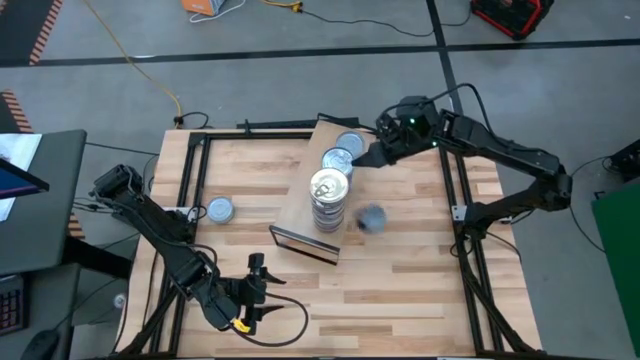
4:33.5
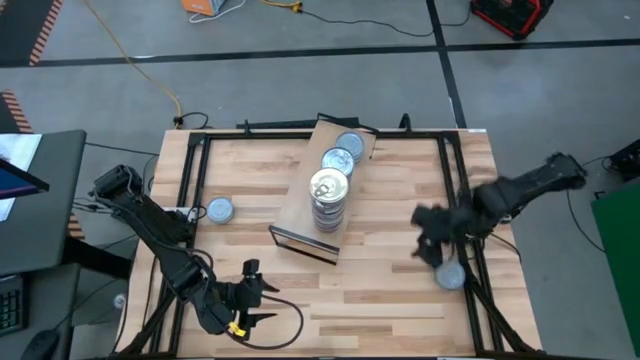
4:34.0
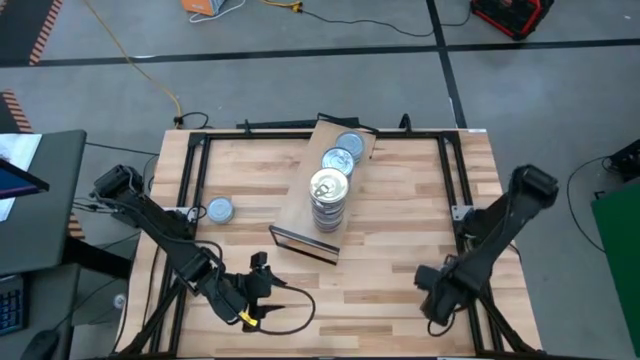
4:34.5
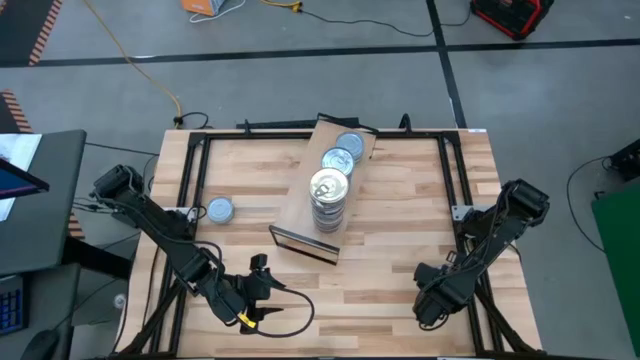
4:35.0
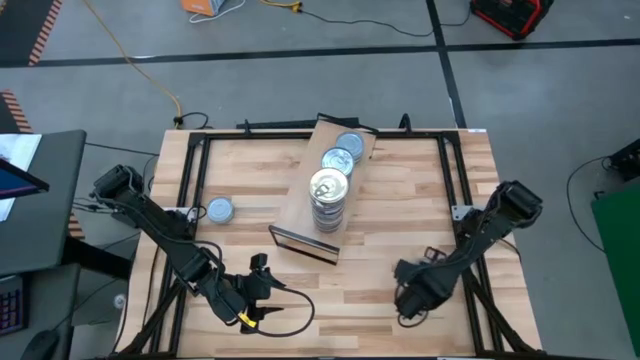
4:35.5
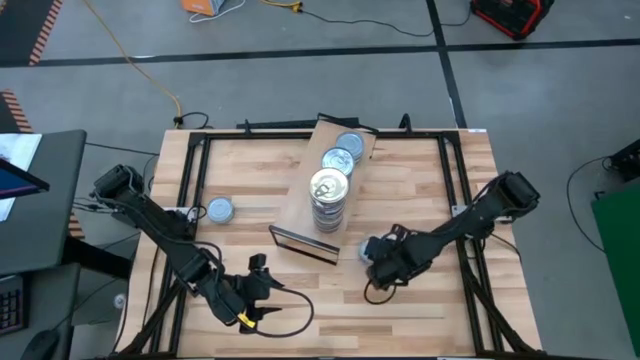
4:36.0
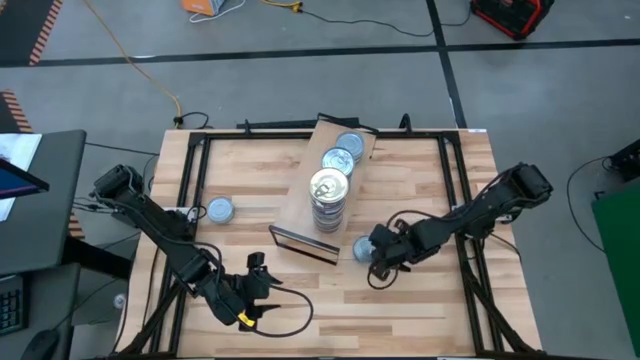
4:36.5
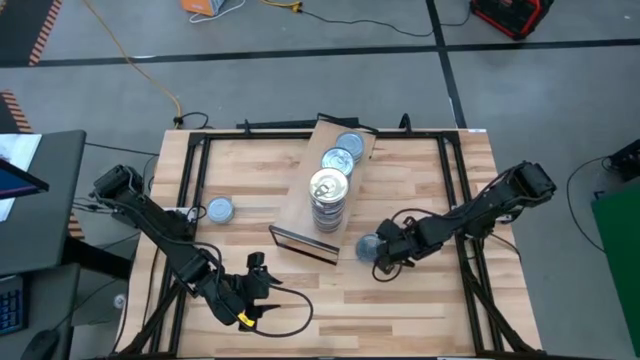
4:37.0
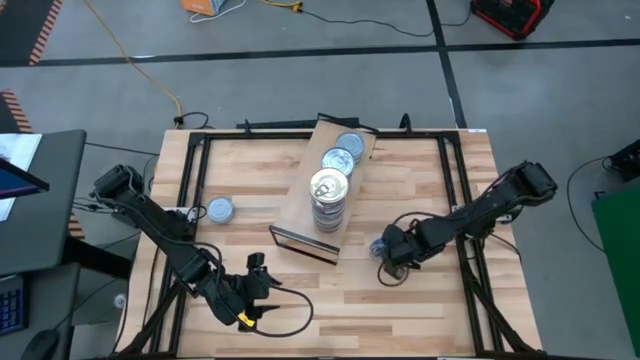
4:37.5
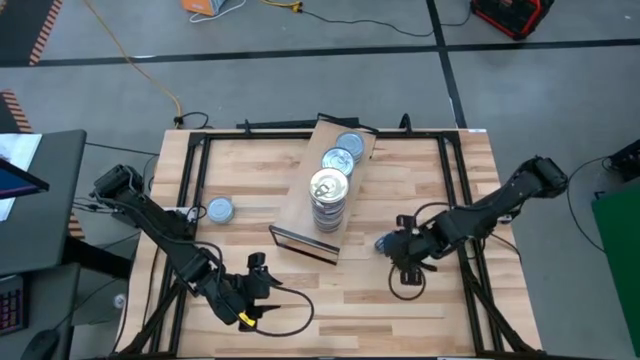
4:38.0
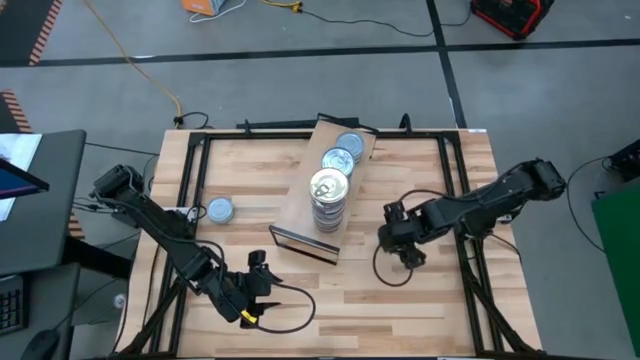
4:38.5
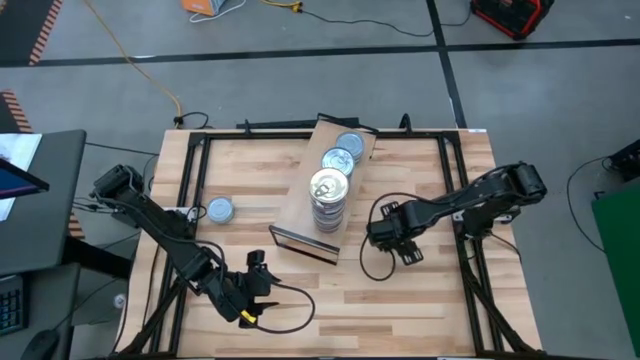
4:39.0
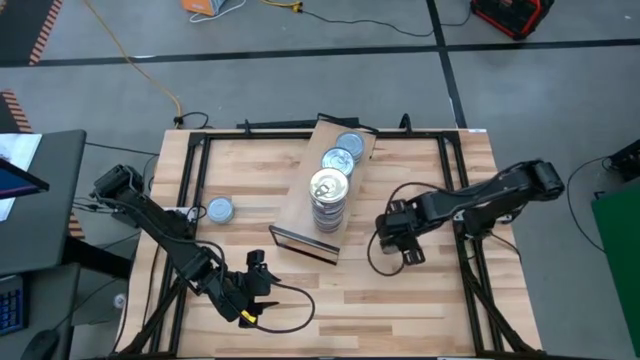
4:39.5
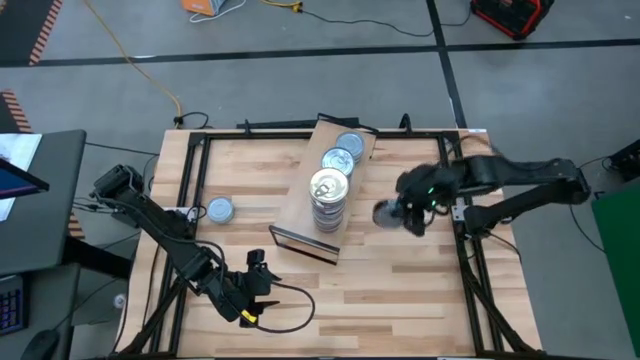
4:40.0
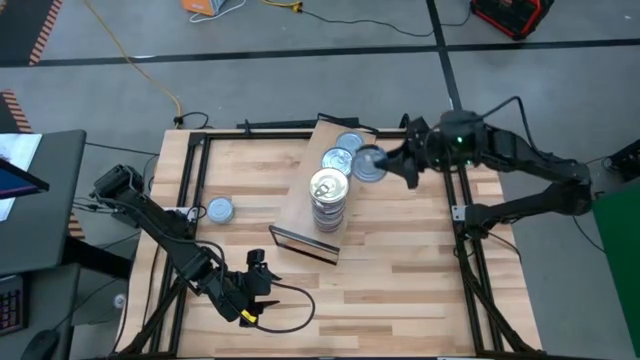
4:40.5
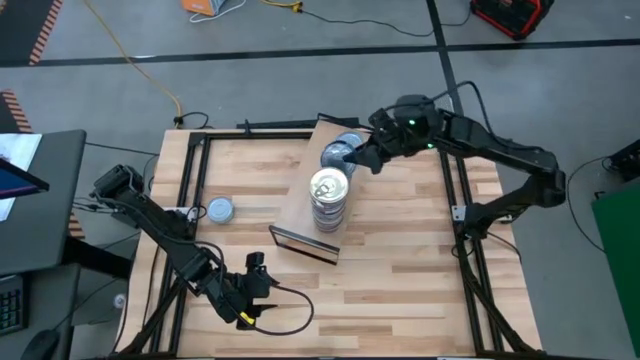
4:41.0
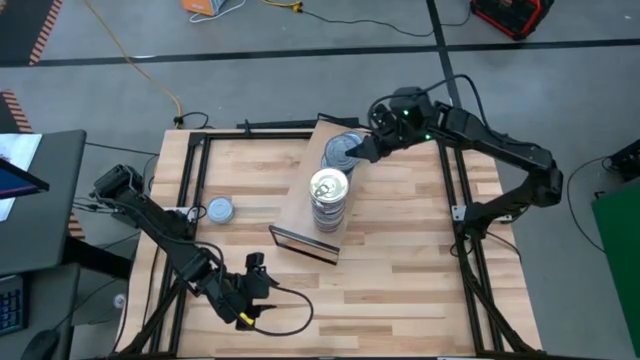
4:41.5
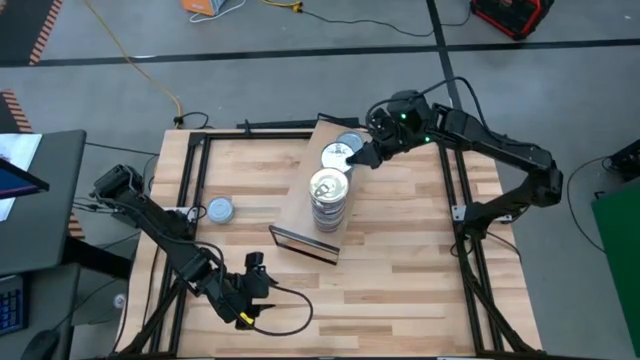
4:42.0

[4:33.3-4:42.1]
Task: Stack canned seafood by type on shelf
Stack the blue tuna can on top of the blue tuna can on the shelf

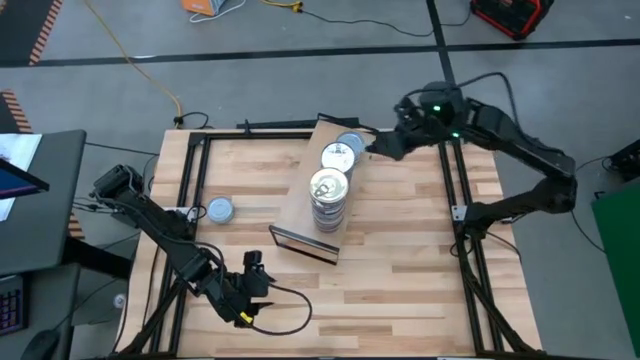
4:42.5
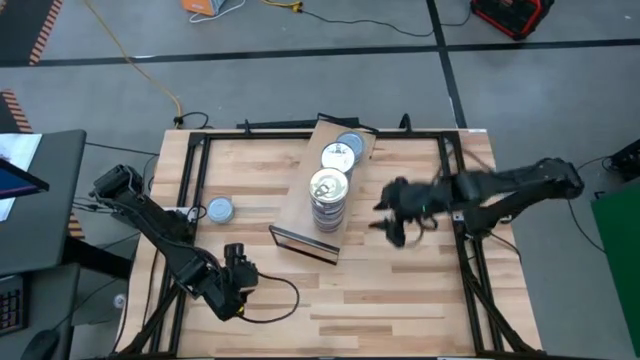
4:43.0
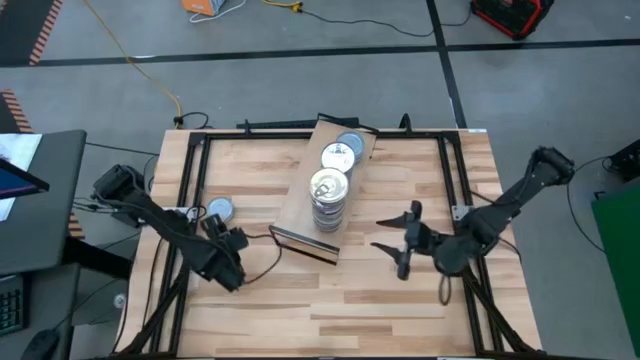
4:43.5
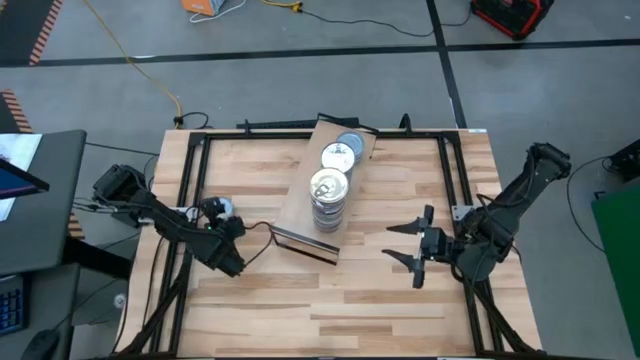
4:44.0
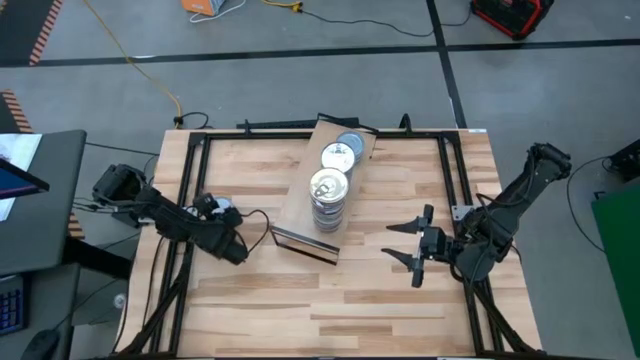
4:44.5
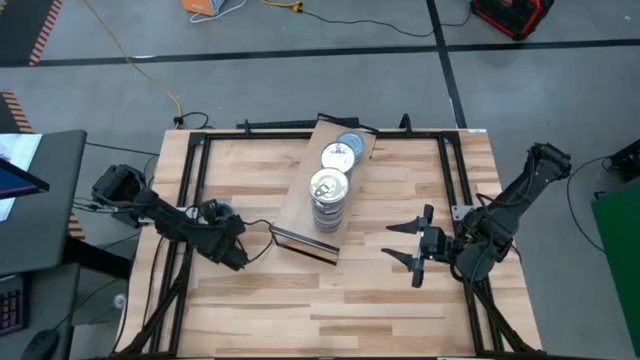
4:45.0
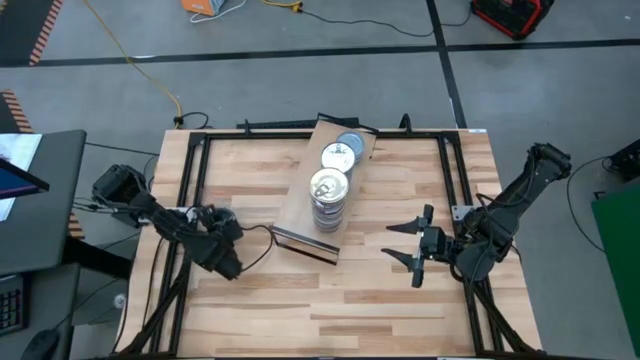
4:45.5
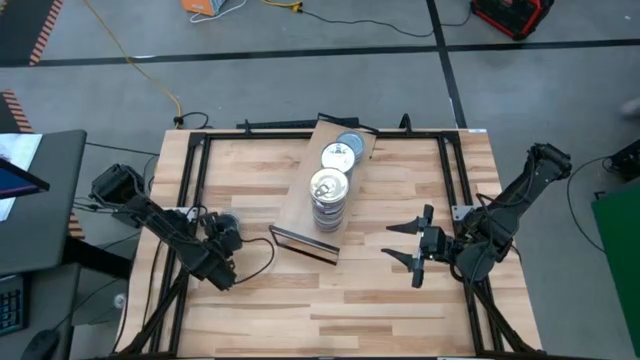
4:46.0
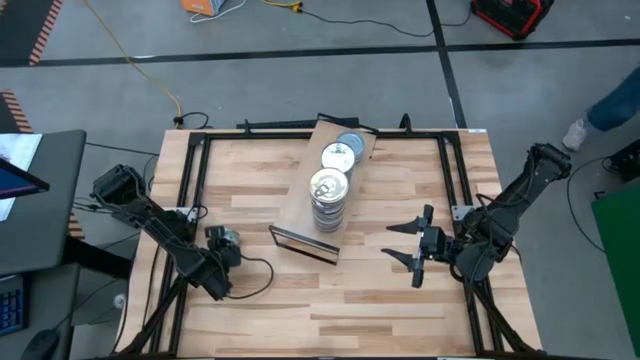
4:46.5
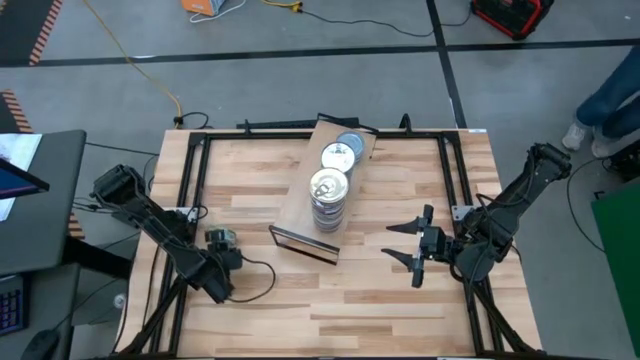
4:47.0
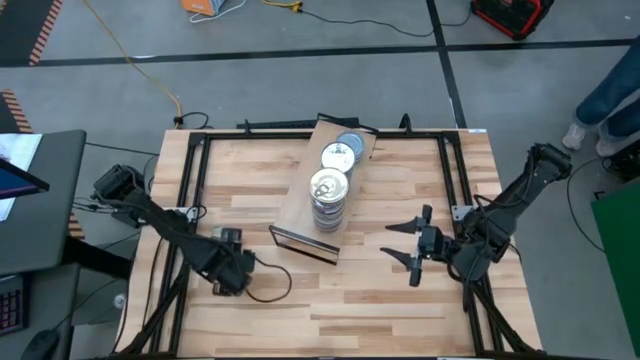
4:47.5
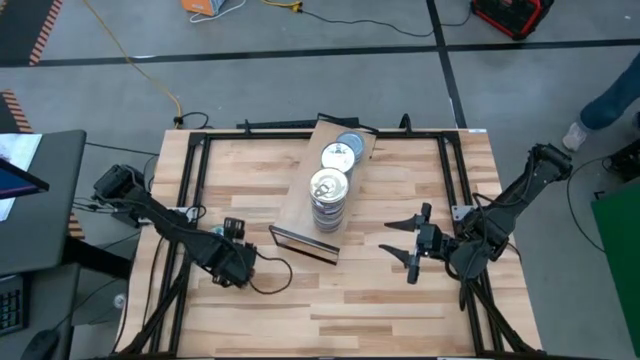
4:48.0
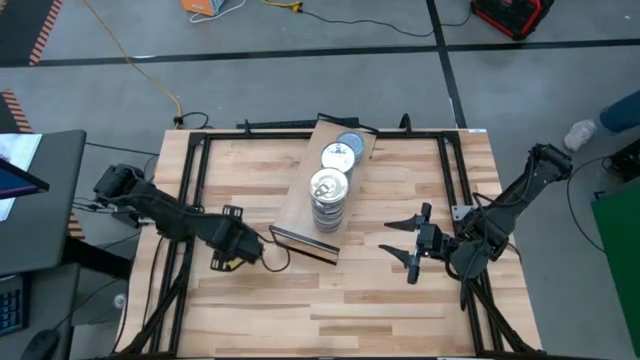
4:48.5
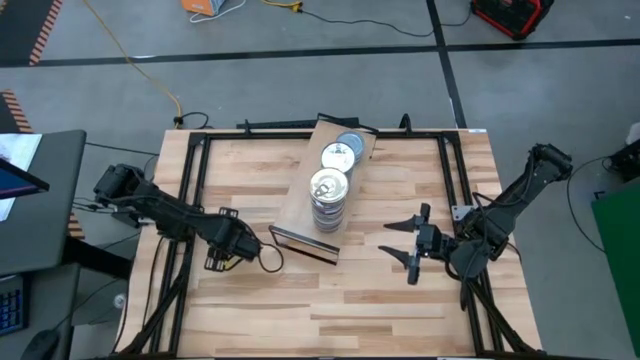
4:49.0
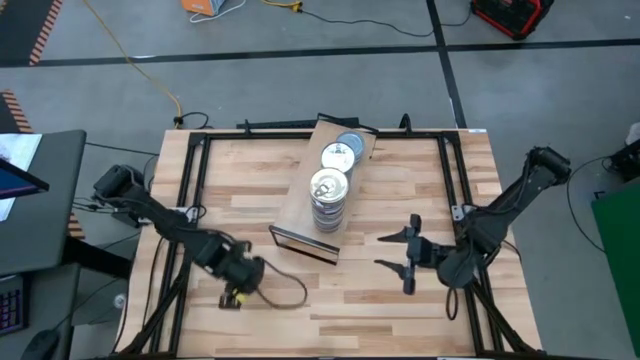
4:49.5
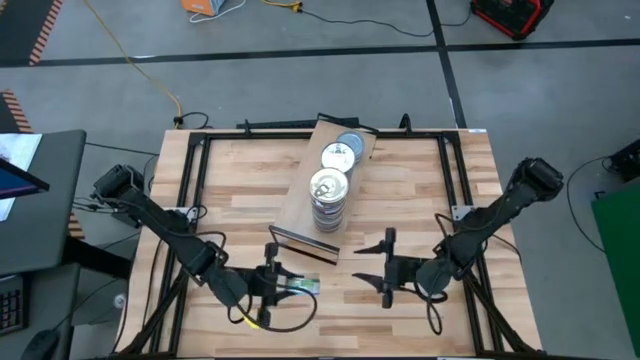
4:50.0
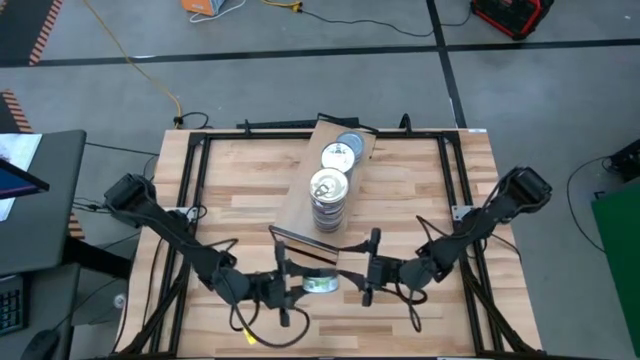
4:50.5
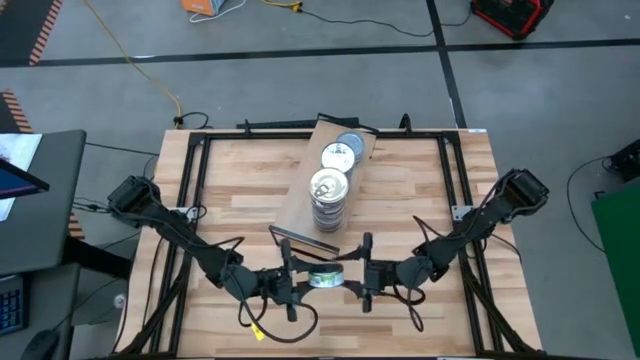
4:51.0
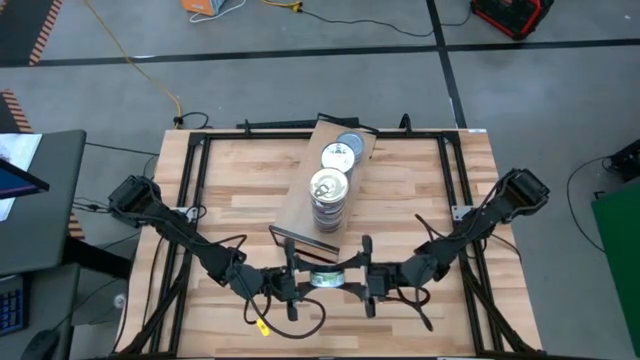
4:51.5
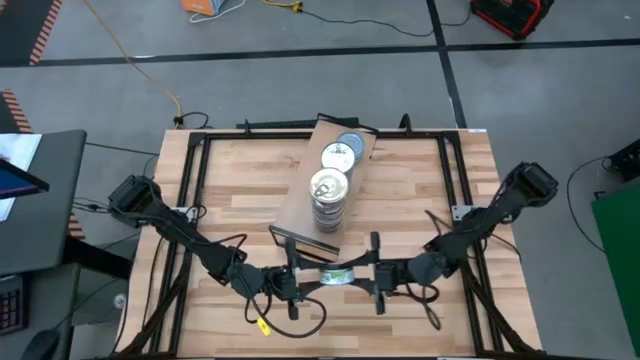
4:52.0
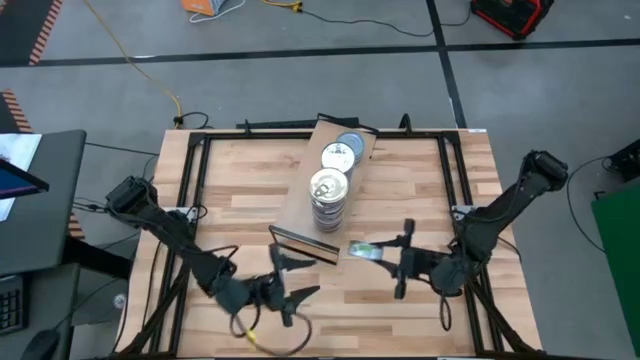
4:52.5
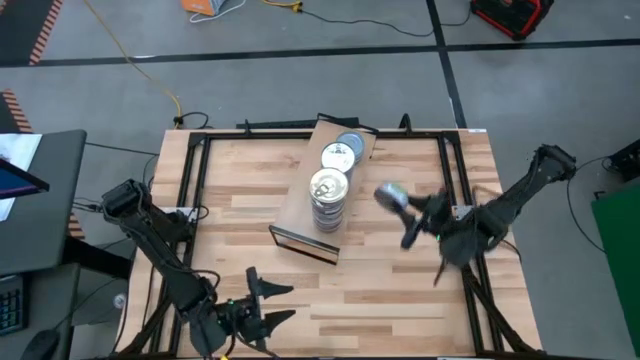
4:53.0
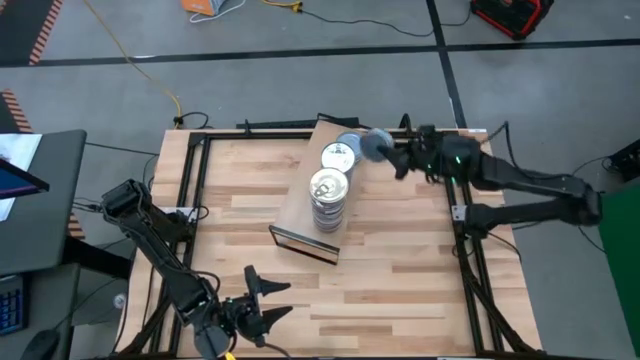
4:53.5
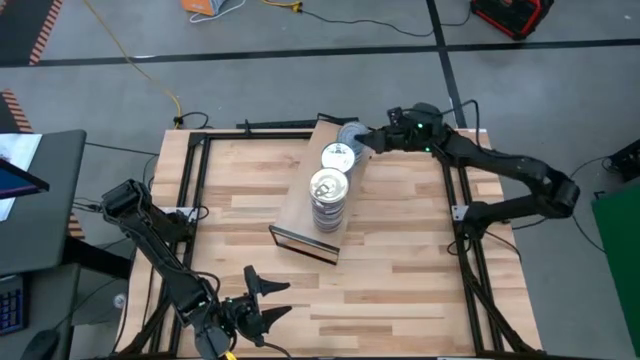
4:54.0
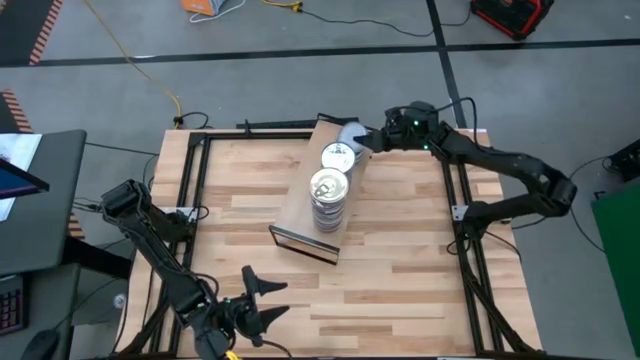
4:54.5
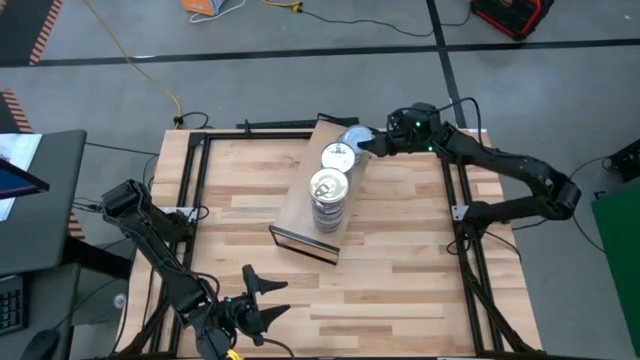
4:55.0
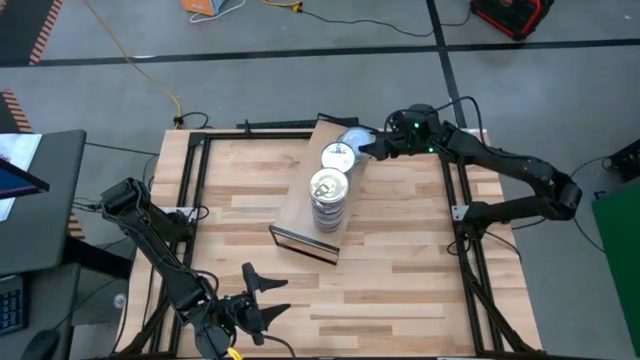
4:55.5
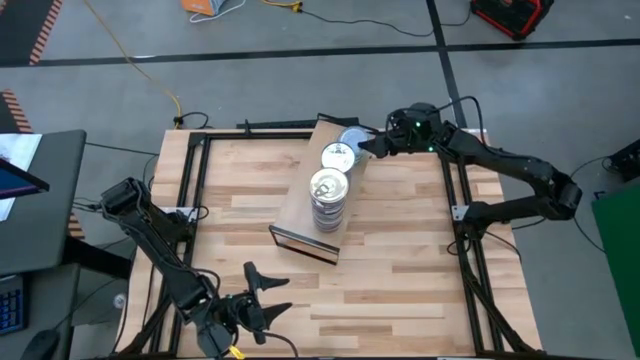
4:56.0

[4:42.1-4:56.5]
Stack the green white tuna can on top of the green white tuna can on the shelf
